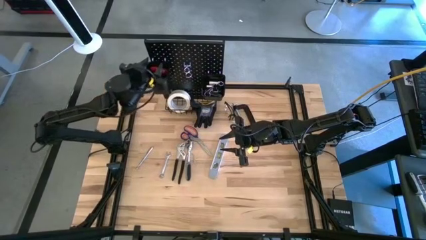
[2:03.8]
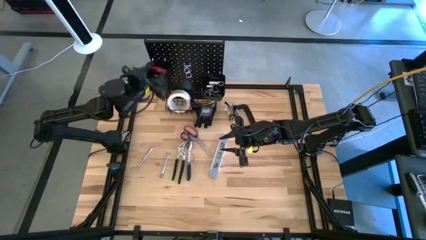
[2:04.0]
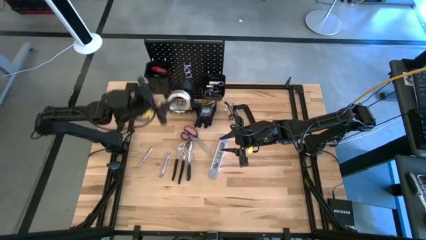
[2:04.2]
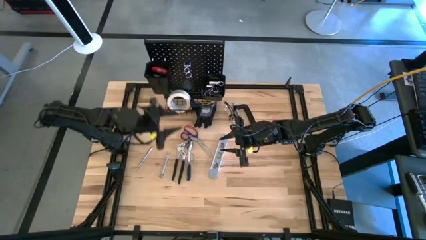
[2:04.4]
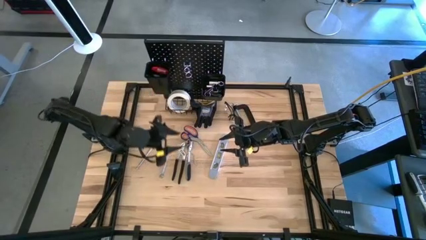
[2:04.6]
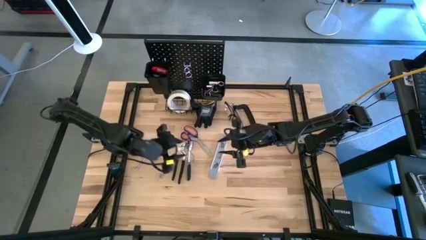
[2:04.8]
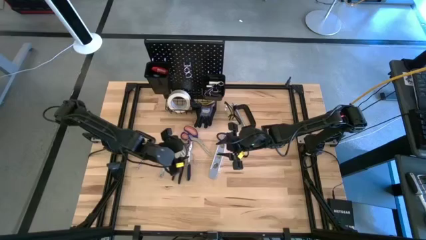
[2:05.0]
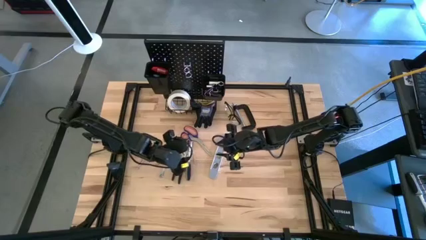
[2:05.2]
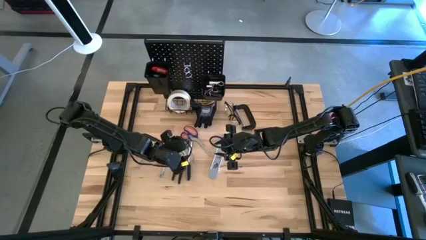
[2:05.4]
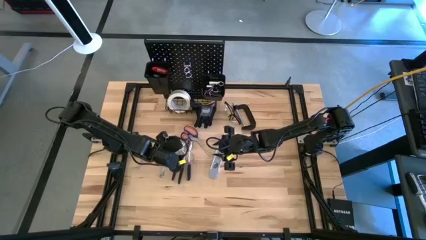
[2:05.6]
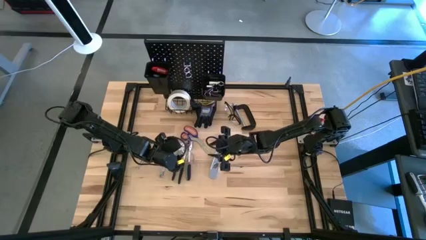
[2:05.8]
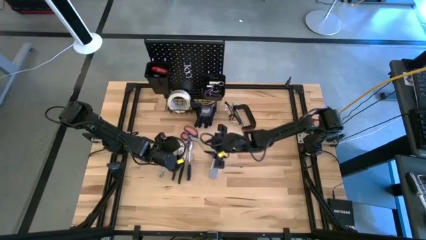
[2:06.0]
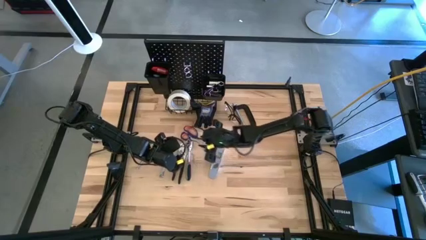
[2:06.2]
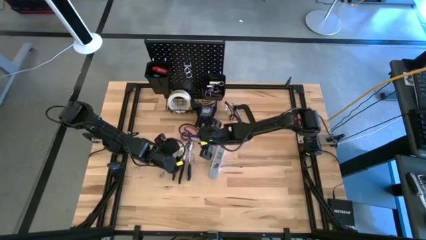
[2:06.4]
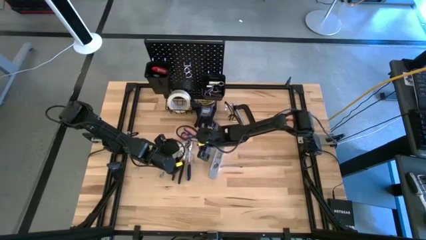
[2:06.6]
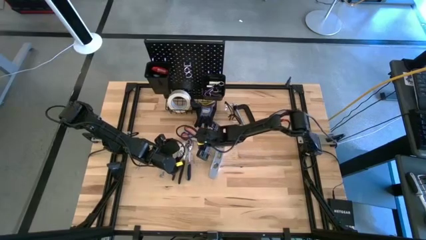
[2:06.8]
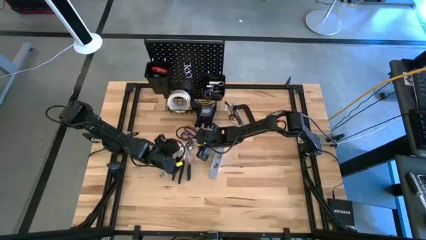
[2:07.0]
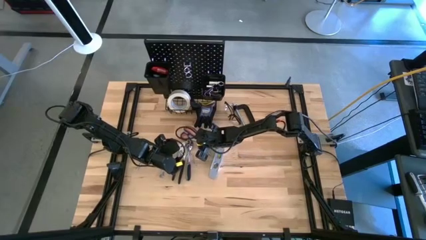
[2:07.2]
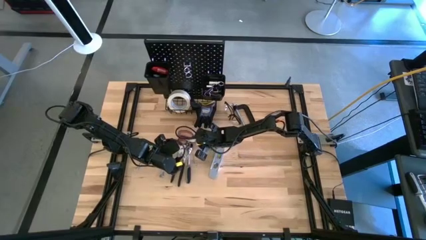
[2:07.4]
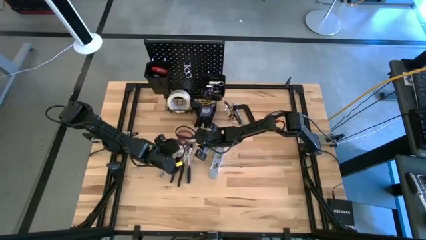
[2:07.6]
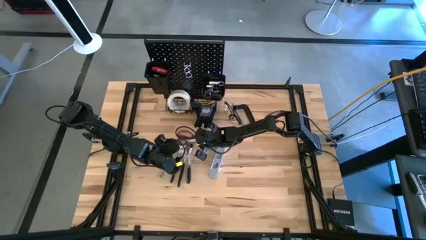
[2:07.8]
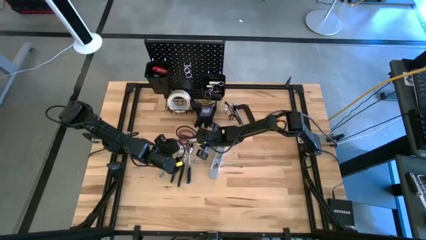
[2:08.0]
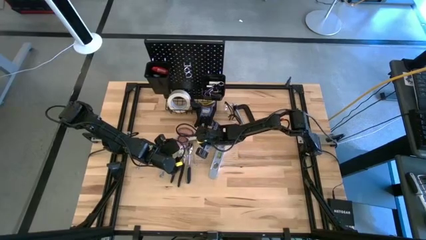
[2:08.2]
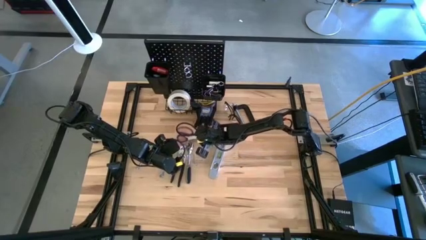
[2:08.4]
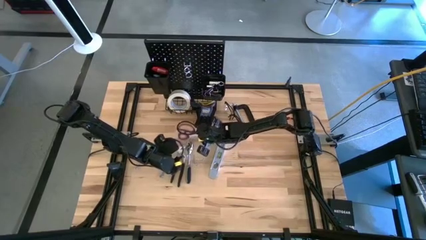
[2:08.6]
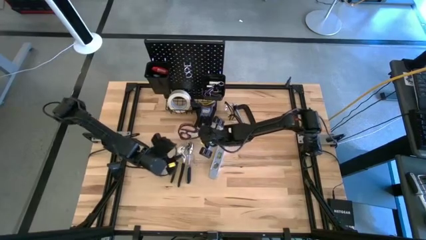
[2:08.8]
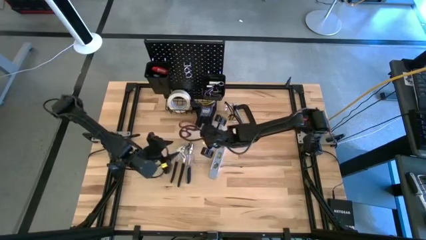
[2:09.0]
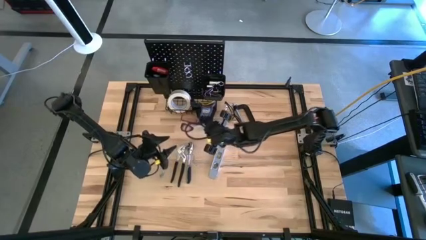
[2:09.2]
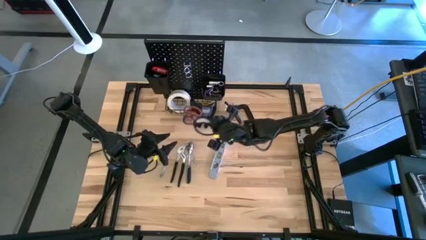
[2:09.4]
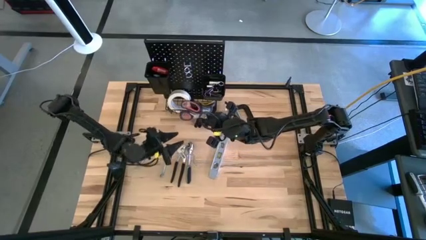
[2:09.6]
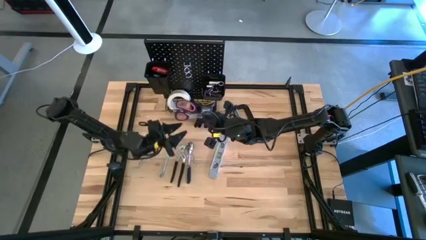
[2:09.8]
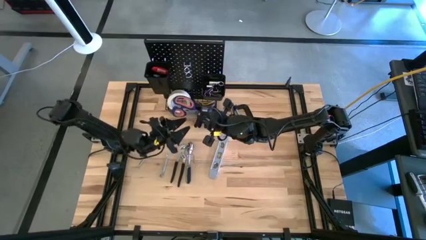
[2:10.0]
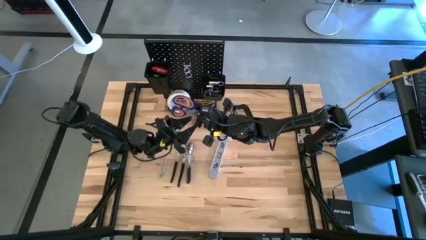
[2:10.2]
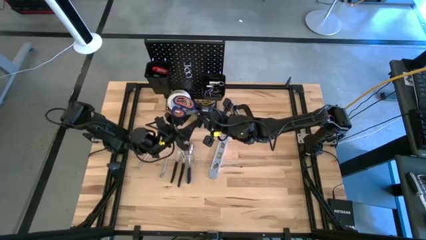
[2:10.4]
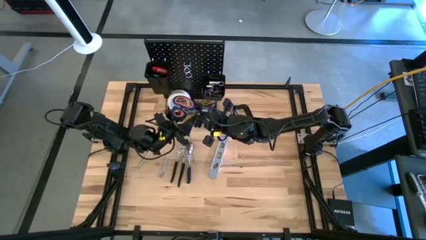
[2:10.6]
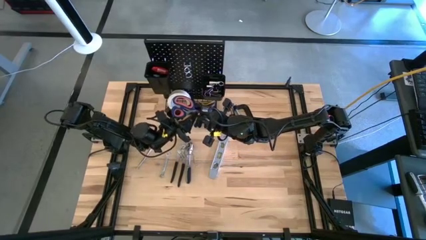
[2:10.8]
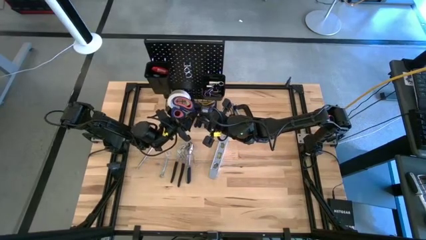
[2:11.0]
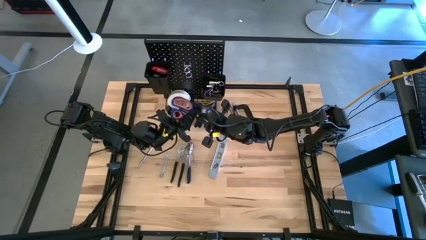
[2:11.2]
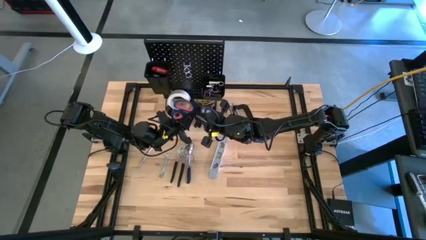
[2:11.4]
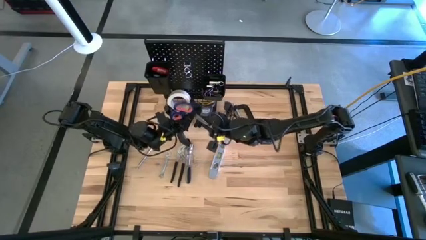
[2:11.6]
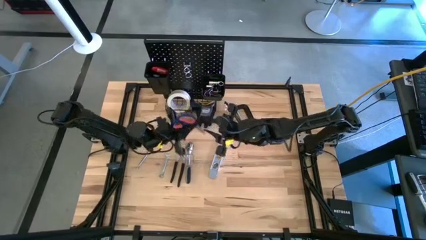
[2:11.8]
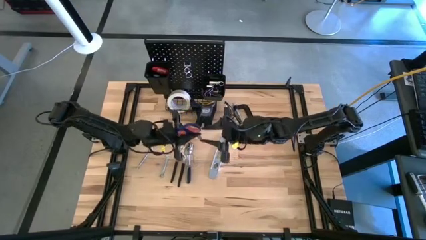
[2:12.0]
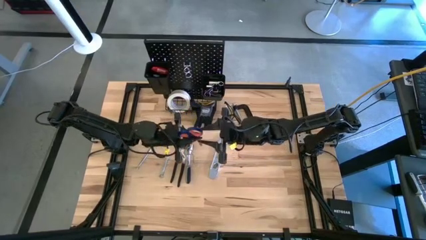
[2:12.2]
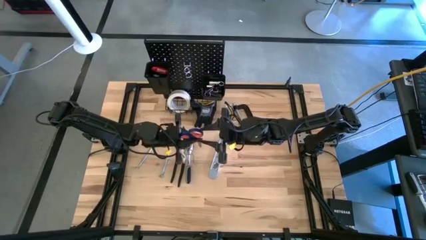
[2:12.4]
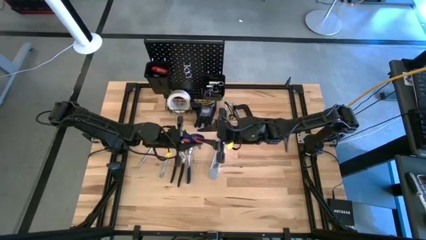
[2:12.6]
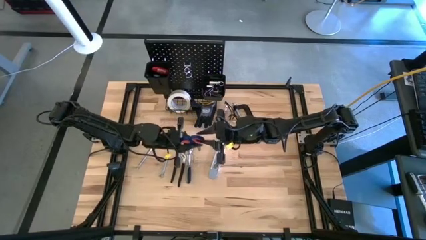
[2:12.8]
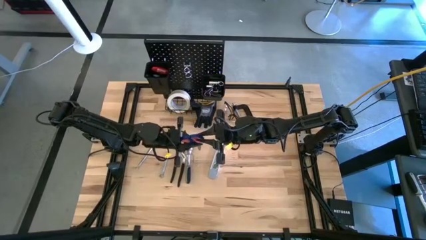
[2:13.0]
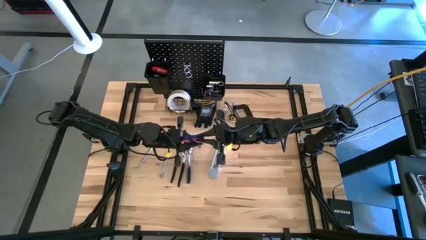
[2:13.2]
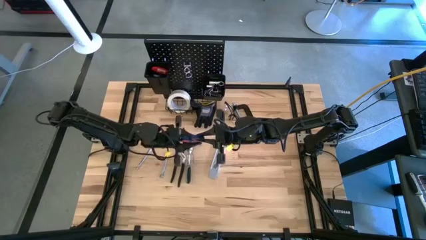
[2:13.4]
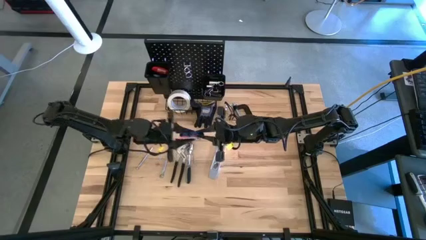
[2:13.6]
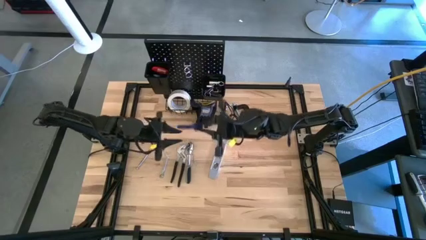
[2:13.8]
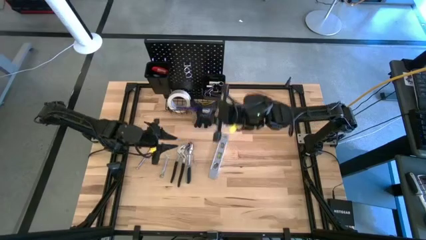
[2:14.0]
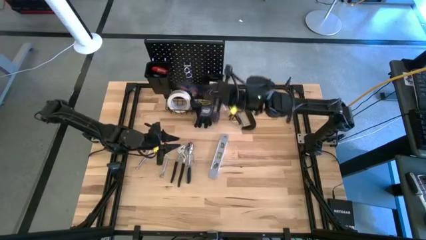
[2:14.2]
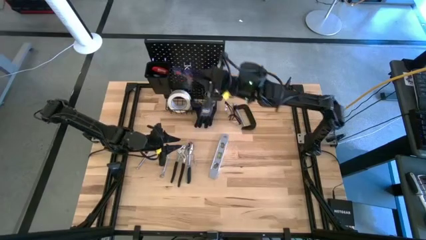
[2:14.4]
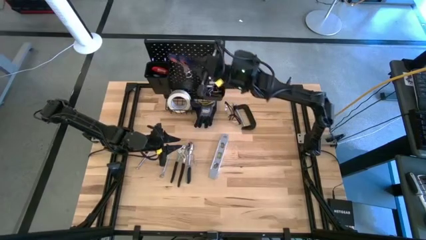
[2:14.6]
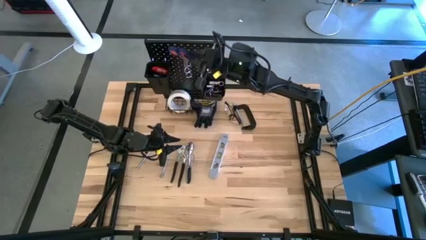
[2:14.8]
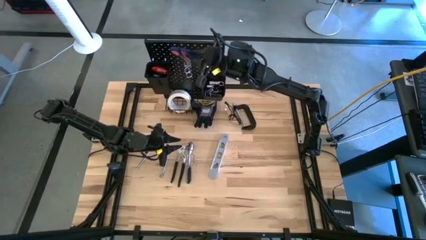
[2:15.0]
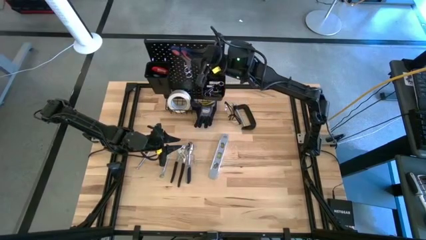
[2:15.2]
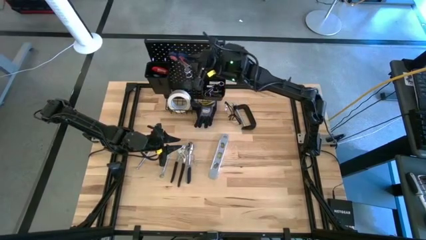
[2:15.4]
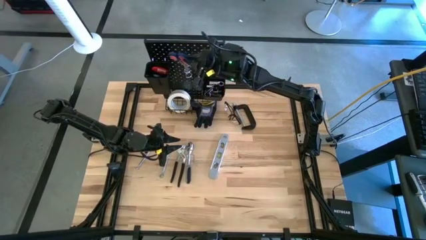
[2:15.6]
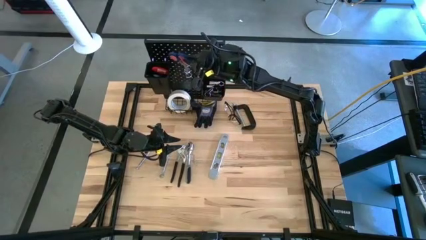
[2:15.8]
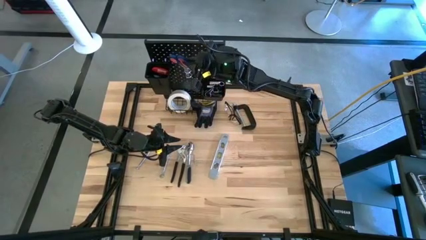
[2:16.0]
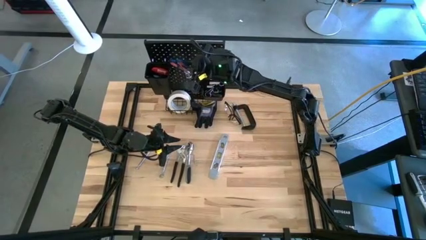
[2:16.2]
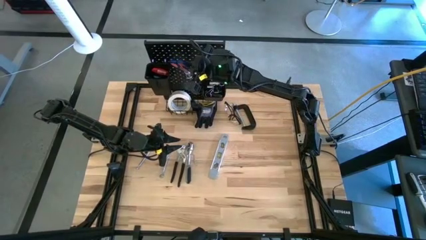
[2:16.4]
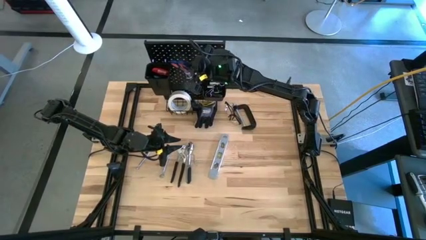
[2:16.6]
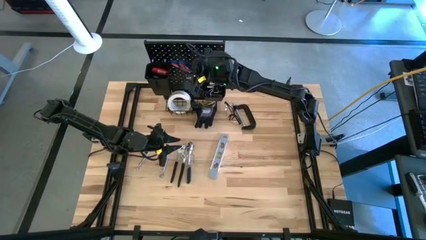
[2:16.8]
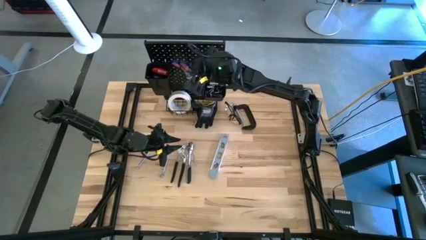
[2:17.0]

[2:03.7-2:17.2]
Task: Hang tools onto peg board
Hang the scissors on the pegboard

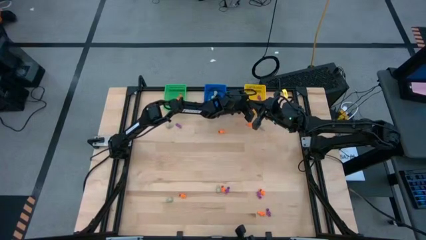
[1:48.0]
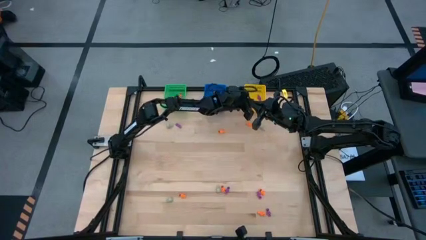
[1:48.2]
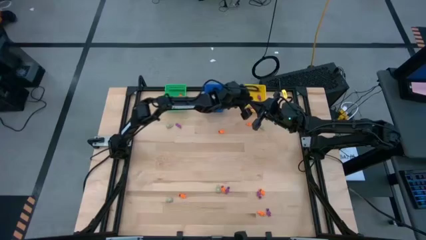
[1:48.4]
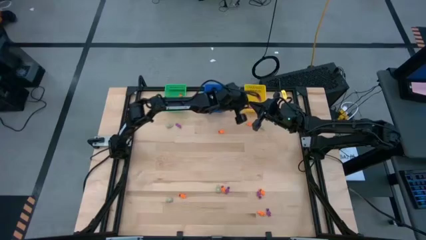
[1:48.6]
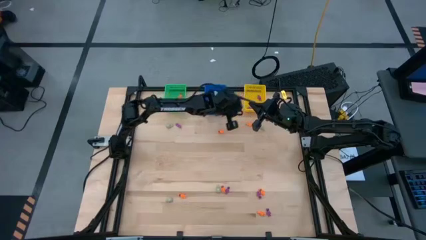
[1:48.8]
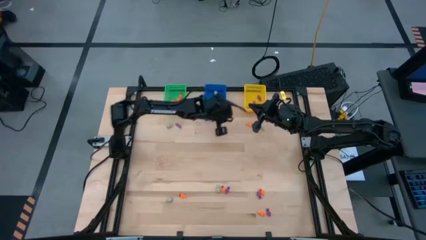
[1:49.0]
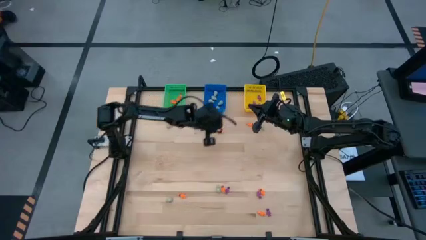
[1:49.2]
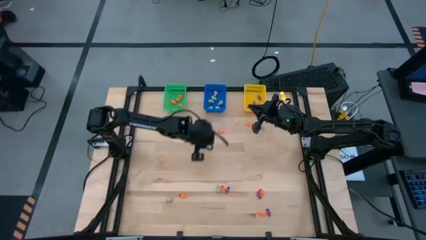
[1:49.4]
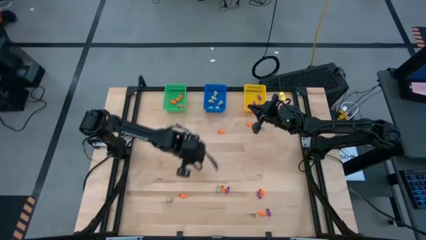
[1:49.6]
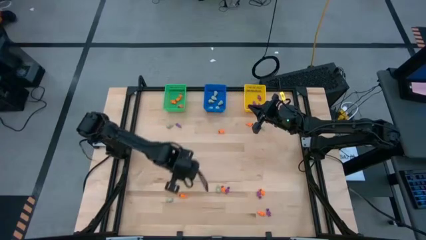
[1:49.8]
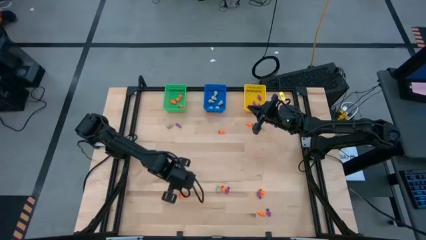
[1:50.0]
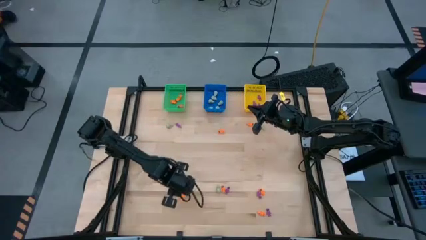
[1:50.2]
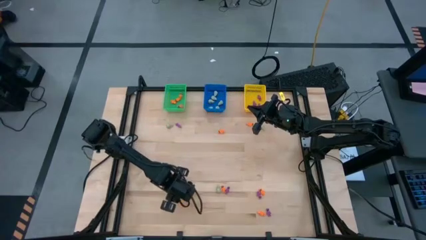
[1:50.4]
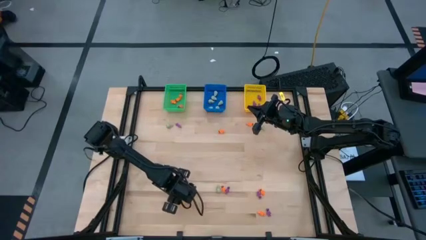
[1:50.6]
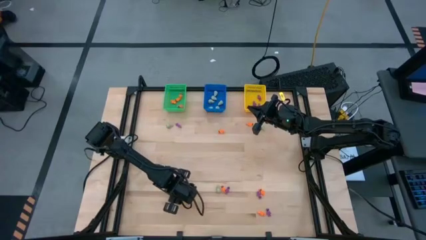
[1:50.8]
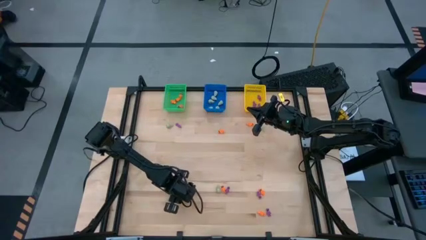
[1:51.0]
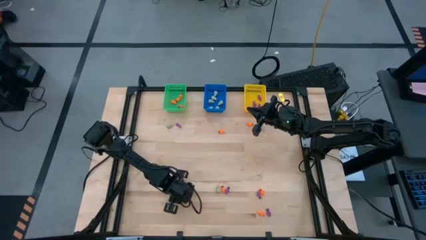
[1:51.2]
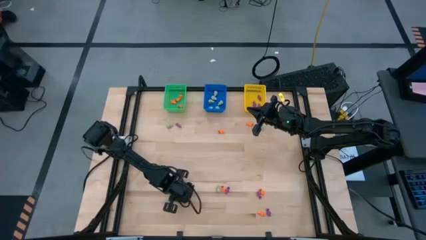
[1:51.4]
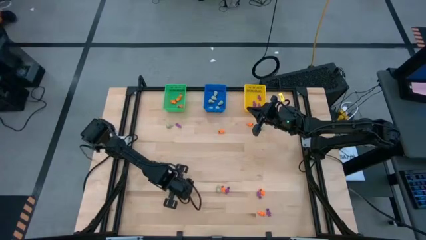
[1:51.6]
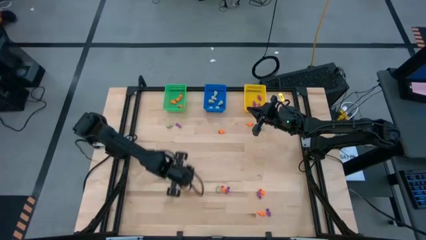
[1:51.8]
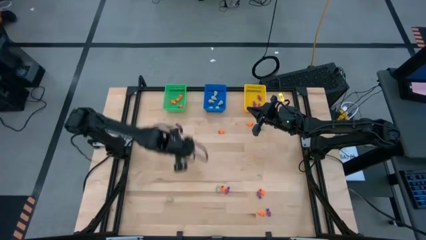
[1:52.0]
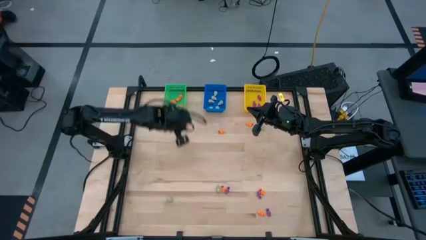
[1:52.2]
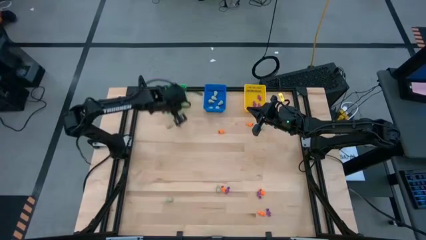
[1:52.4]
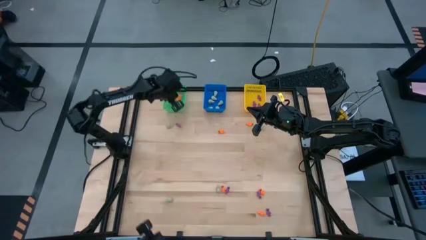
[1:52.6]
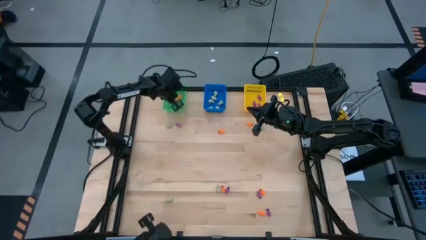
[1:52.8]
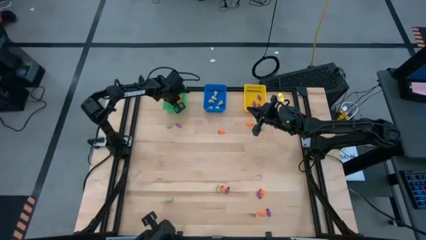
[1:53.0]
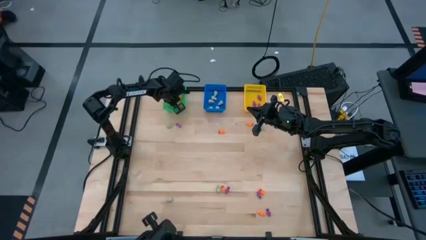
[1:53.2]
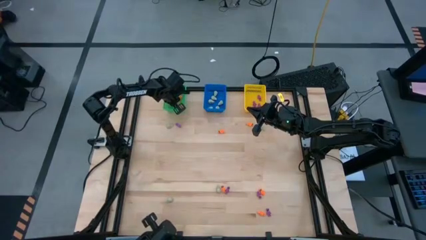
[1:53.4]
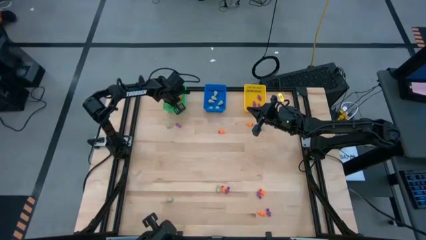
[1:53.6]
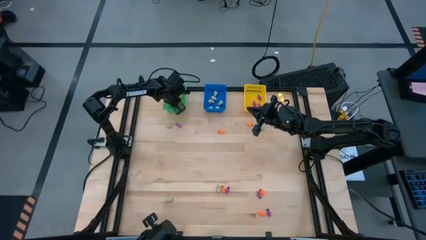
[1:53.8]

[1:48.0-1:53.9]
Task: Sort Halloween decoration
Put the orange skeleton toy into the green bin
